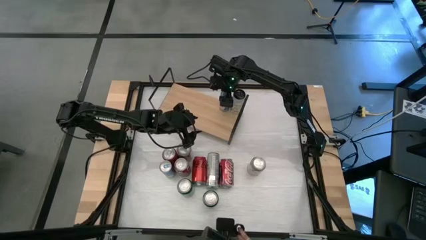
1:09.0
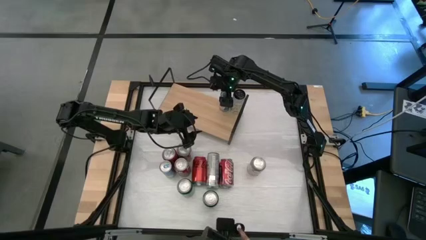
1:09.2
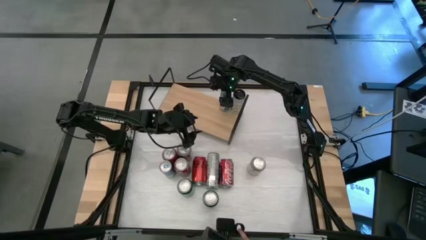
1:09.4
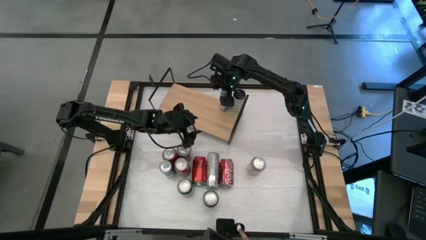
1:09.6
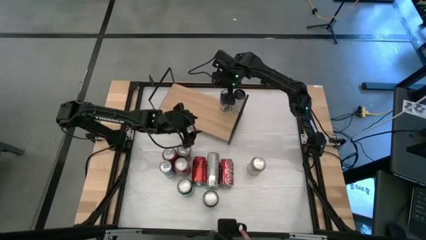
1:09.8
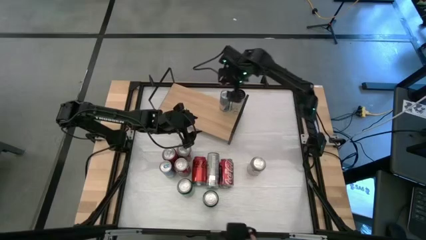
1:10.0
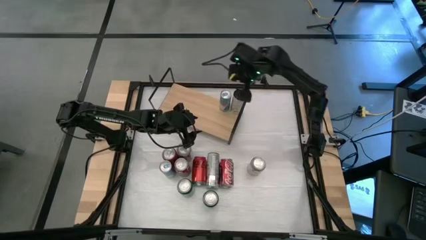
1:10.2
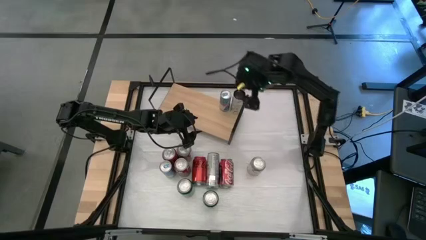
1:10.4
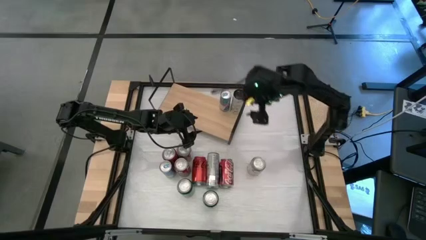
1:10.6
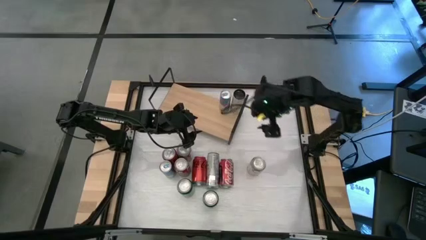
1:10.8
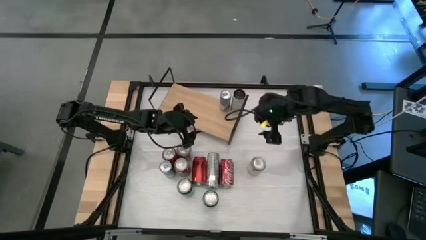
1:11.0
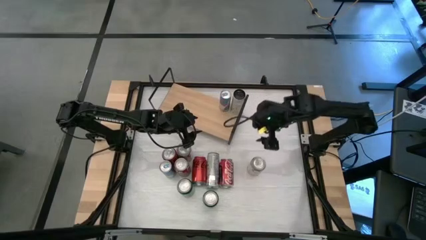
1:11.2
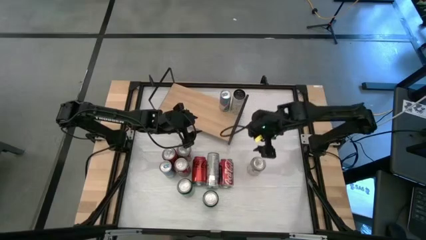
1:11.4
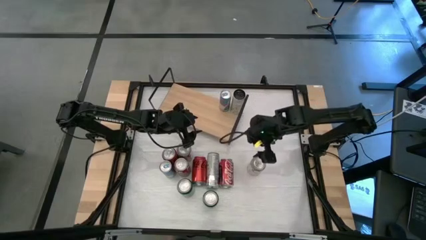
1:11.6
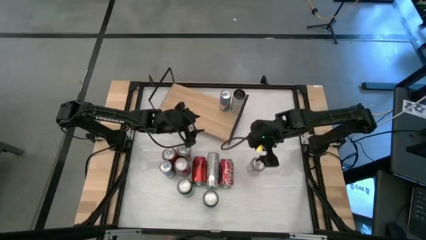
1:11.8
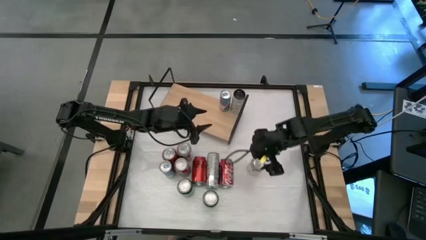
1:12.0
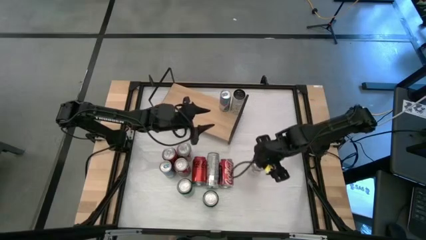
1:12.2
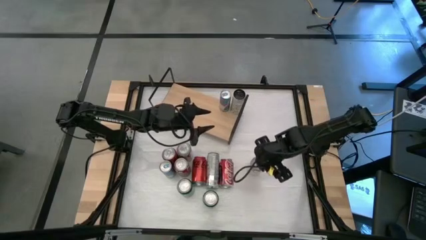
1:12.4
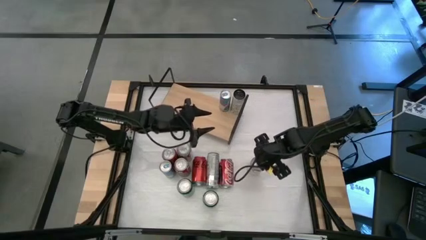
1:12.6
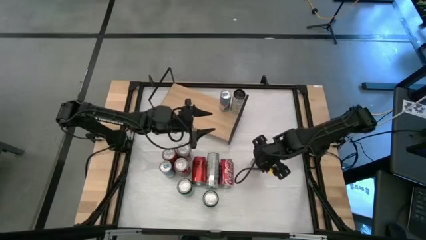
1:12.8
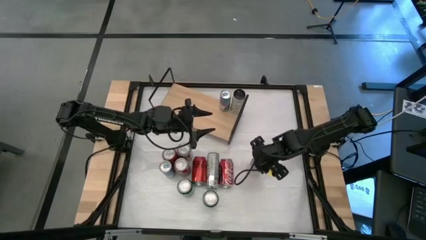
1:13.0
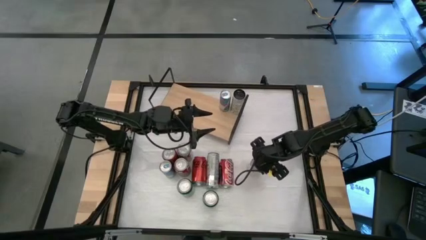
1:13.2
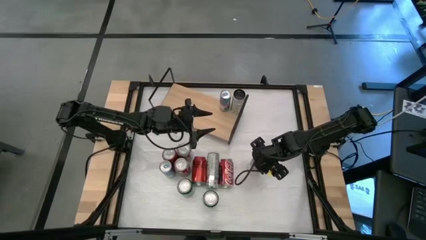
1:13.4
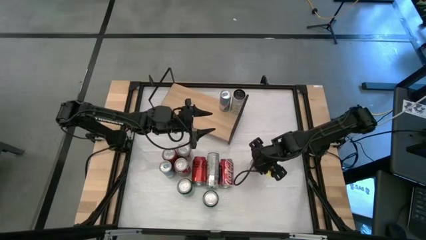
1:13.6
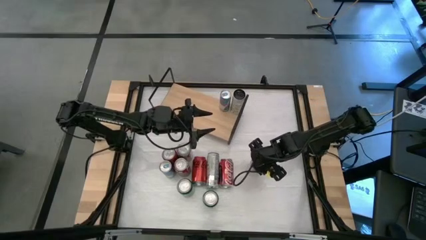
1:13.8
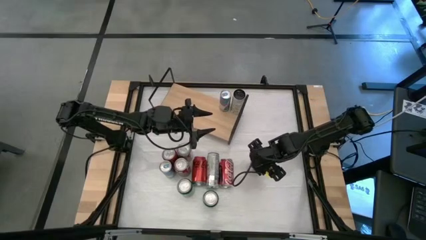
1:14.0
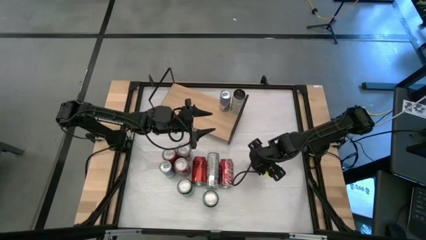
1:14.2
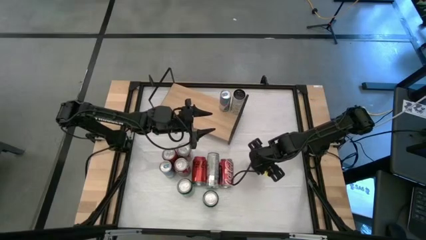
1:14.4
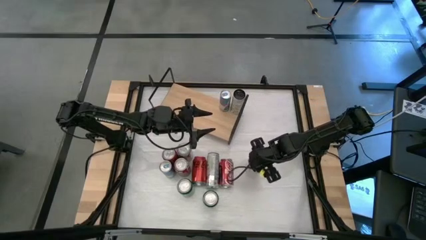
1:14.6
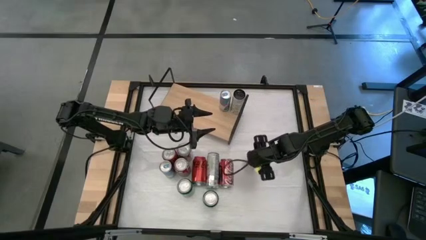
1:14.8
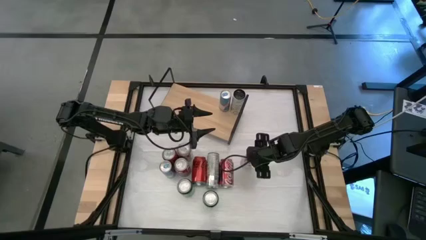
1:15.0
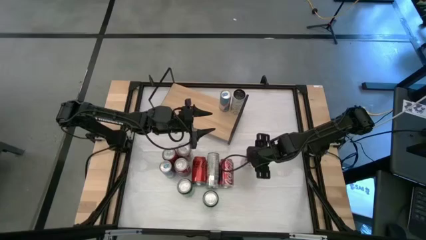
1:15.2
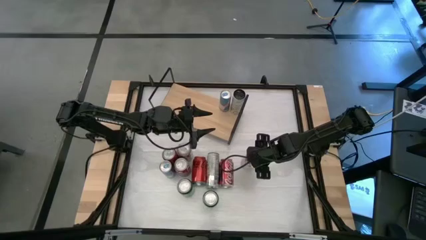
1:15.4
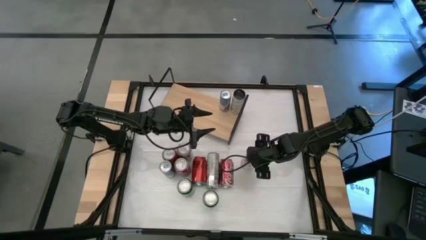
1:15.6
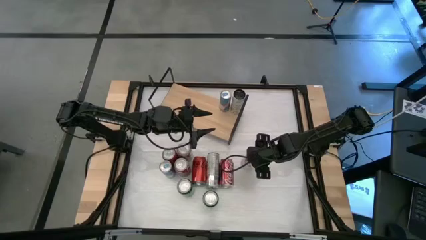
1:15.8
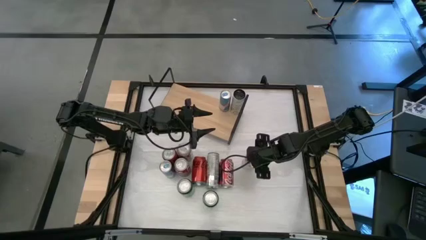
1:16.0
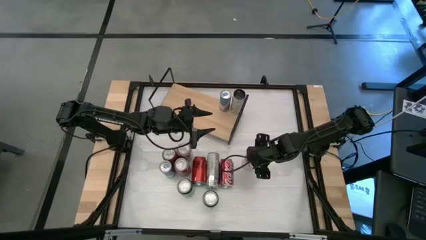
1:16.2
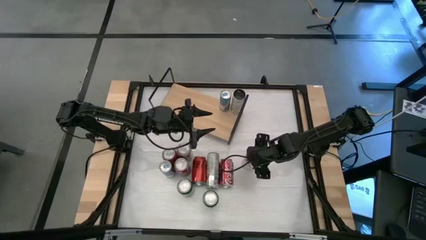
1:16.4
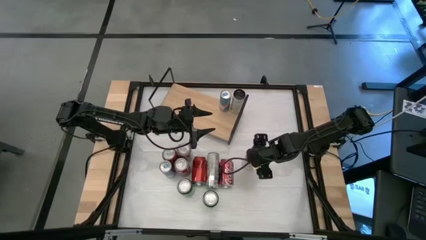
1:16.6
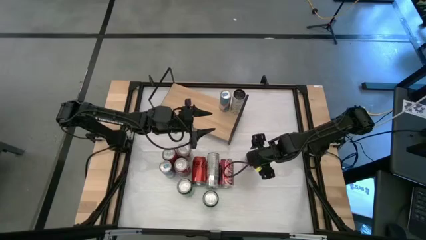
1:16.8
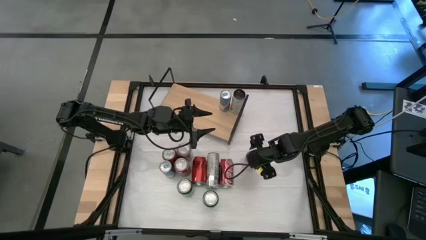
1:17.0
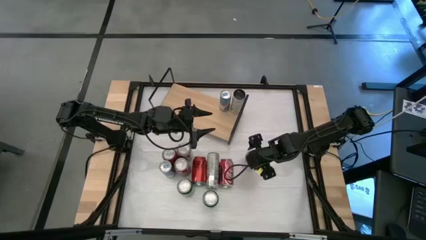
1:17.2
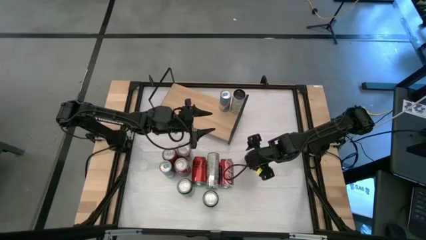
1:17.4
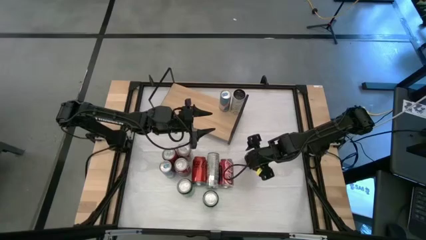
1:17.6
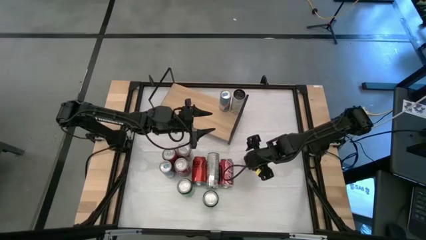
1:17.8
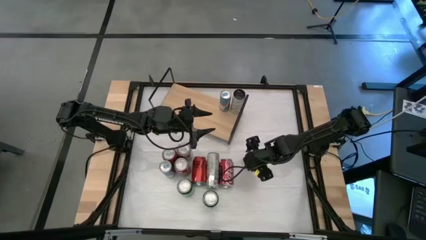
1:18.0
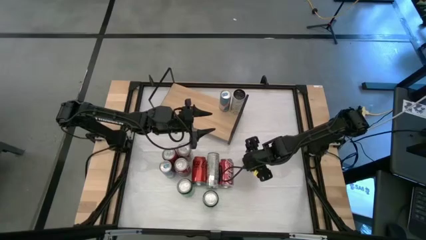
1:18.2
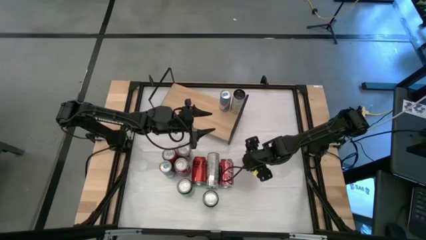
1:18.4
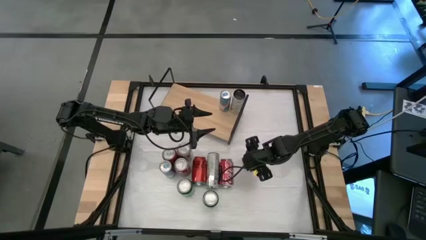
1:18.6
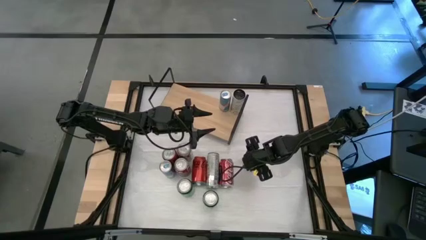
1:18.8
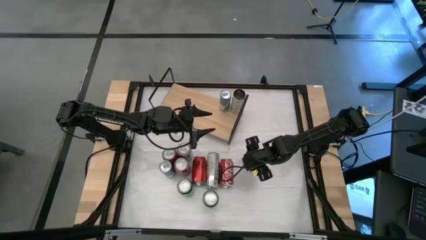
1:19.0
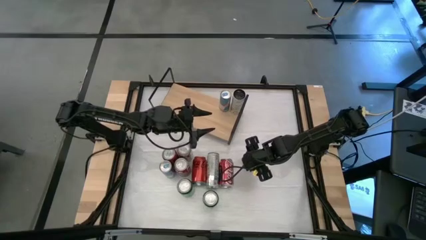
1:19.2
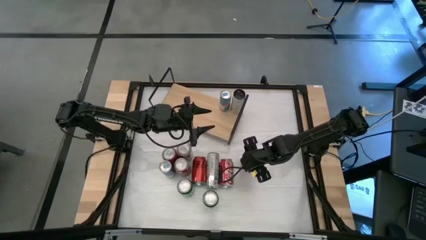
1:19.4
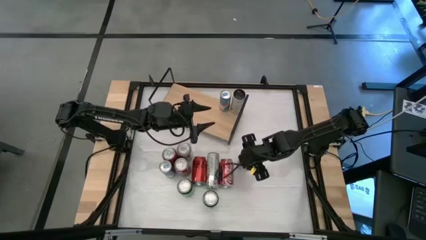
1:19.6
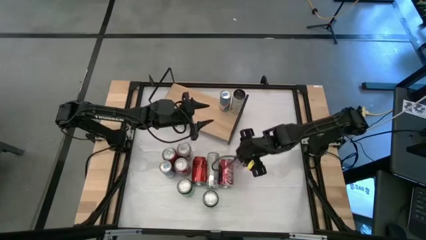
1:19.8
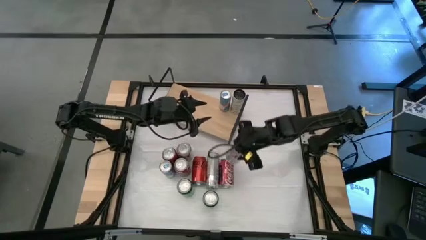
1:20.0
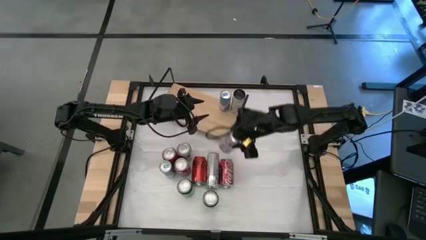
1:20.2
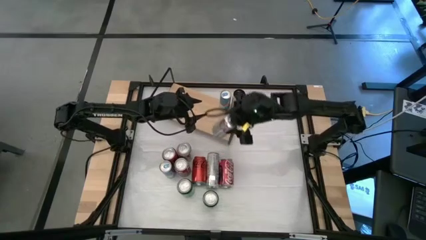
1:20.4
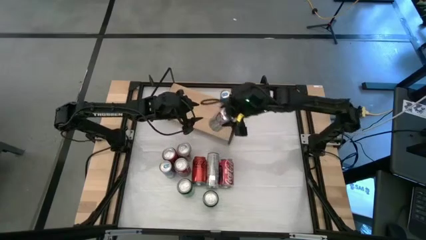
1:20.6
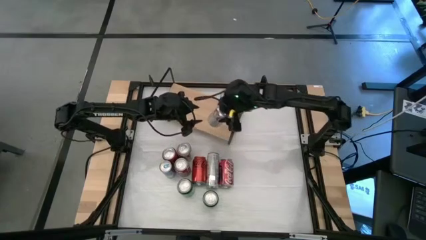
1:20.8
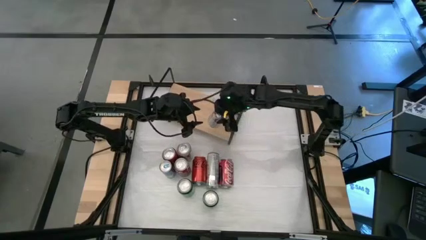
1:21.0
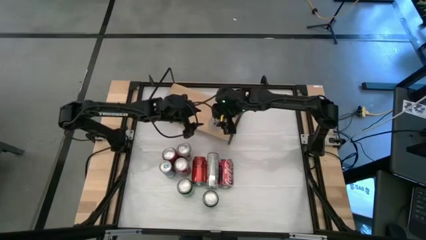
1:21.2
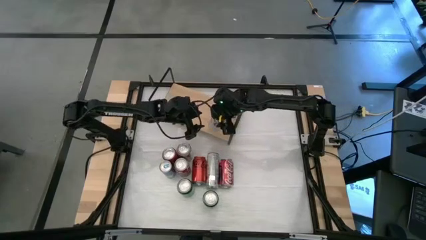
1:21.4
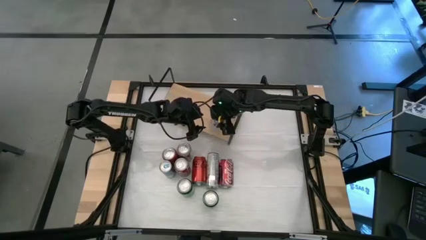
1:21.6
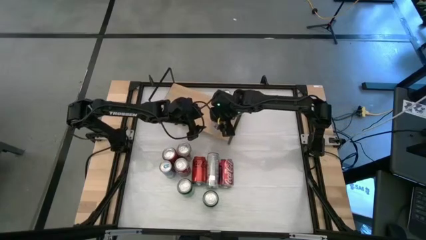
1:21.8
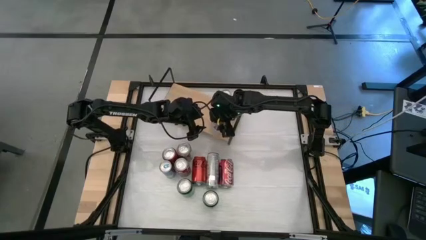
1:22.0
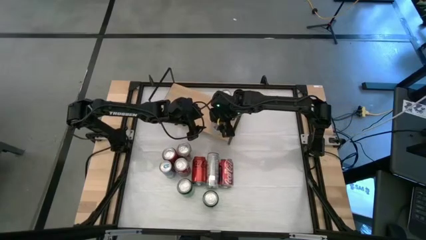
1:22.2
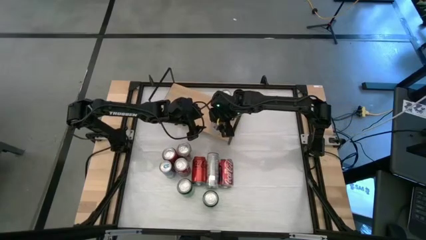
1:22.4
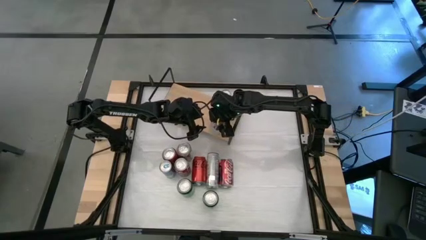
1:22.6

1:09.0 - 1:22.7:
Task: Place canned beverage on shelf
Put the right silver soda can on the shelf

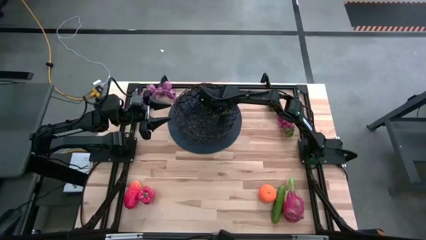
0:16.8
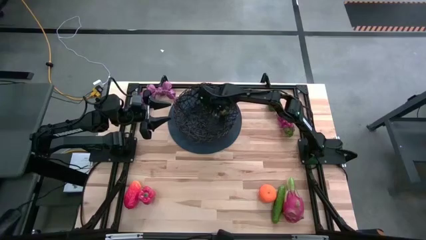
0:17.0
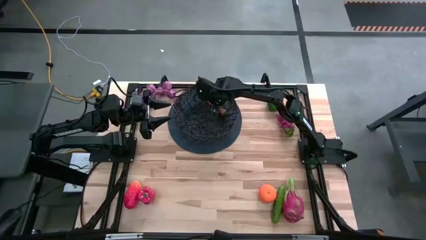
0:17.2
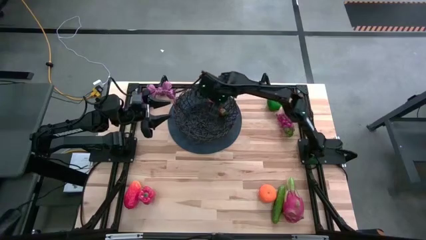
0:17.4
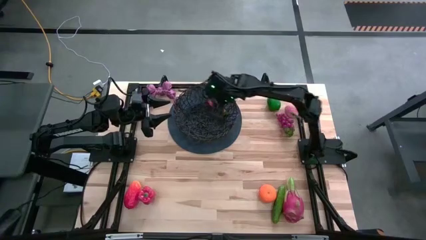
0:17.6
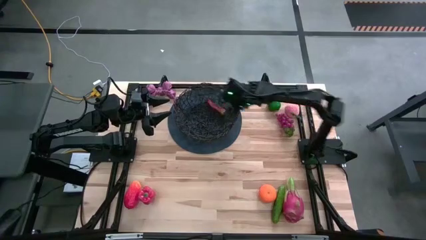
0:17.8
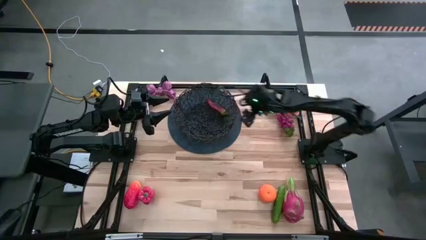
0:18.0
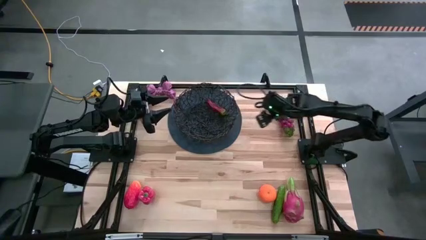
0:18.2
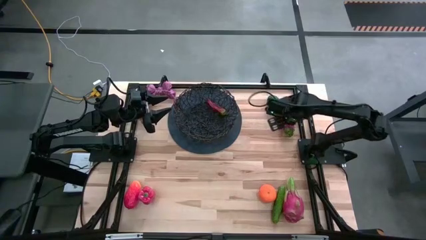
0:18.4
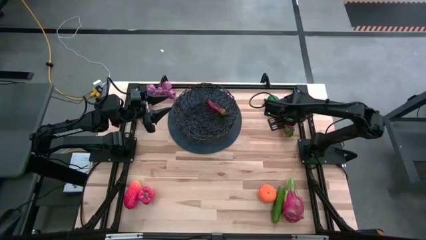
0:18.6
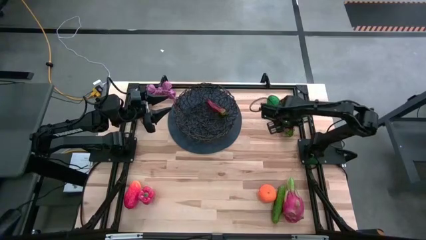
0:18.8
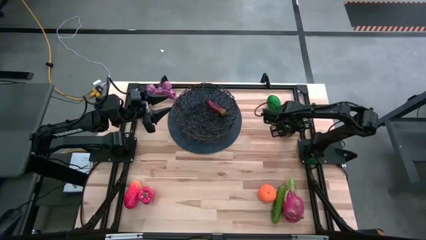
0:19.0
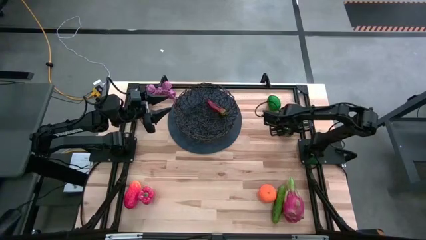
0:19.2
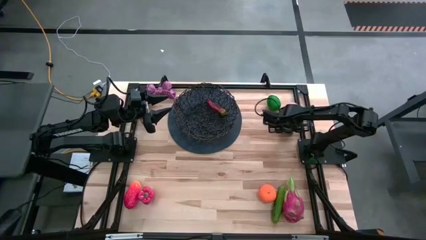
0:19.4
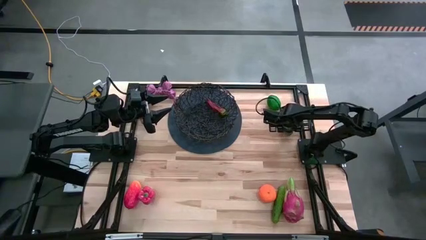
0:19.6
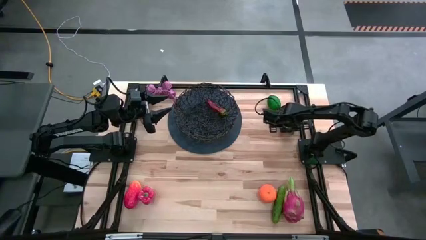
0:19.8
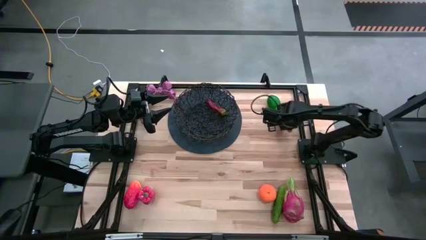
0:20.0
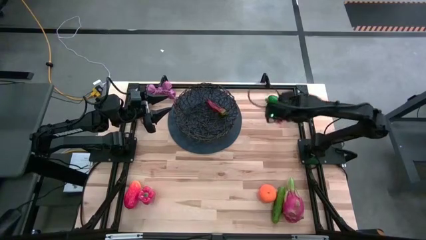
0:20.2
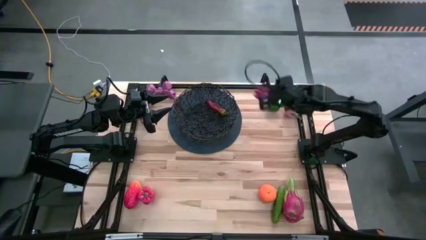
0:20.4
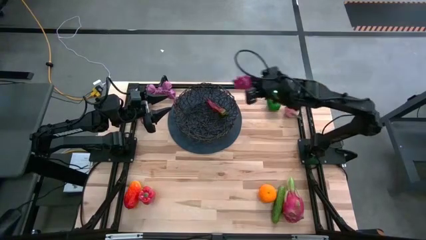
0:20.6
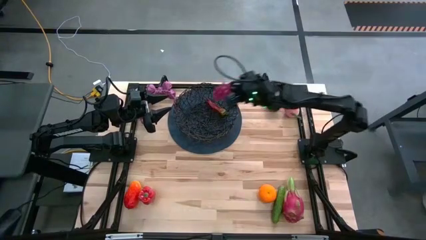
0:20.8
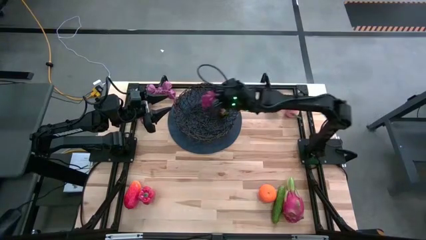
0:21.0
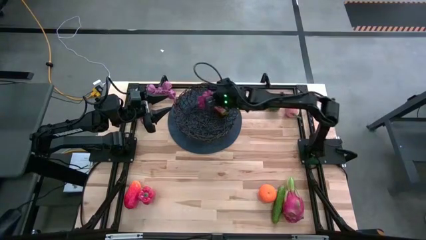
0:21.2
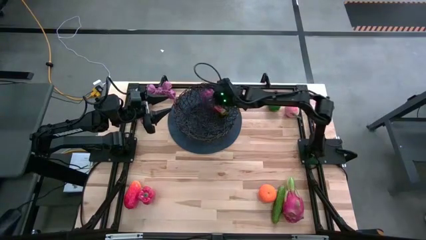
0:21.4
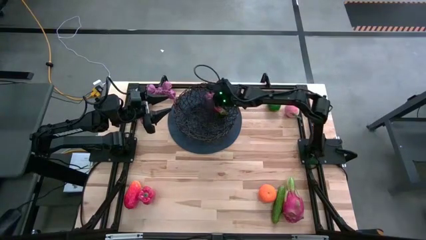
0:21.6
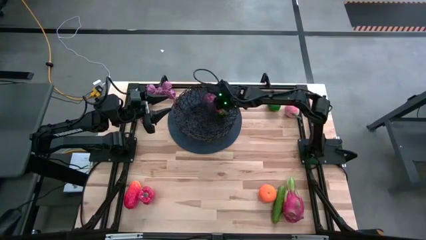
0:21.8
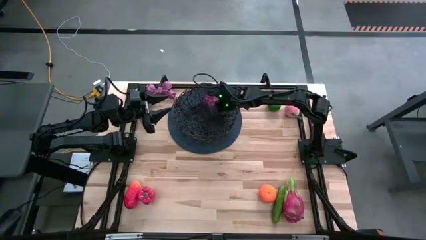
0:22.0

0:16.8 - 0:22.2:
Task: Build produce basket
Put the grapes into the wire basket
